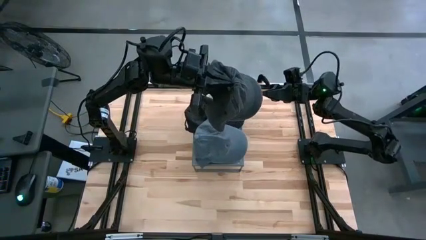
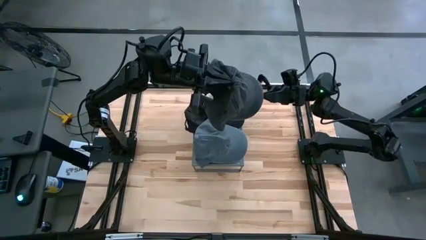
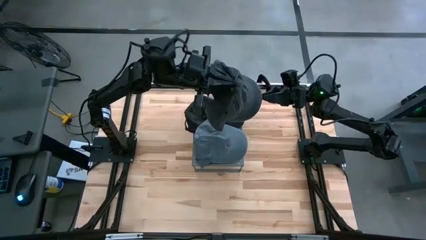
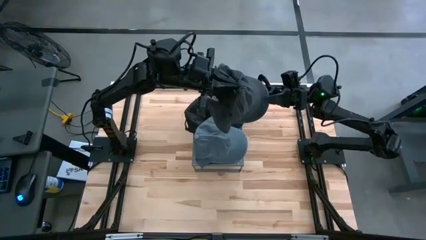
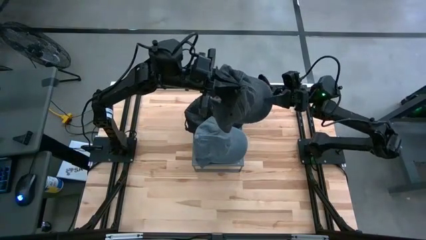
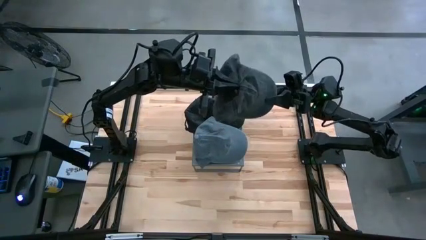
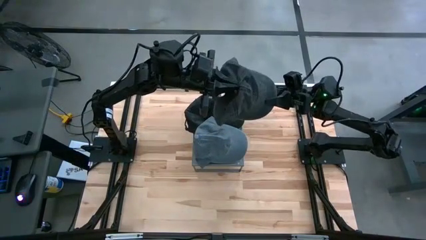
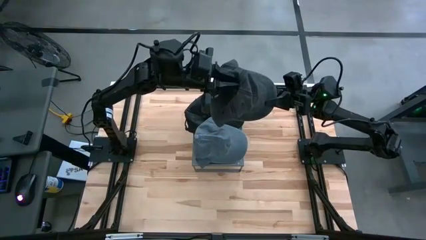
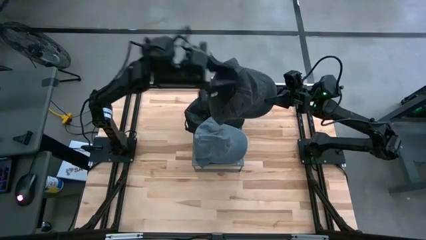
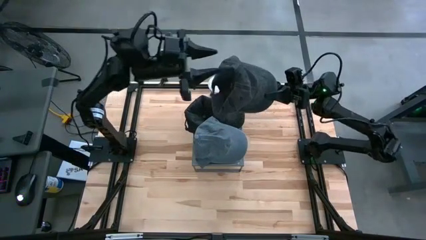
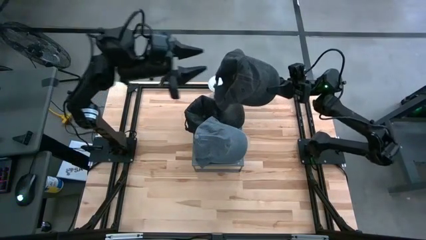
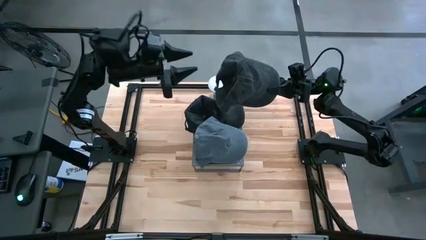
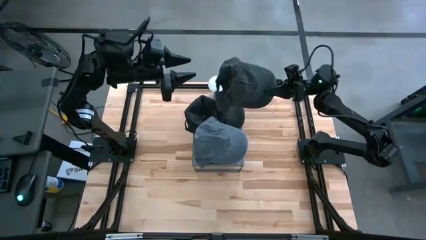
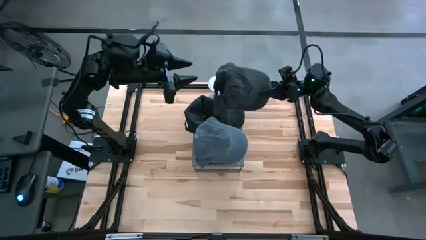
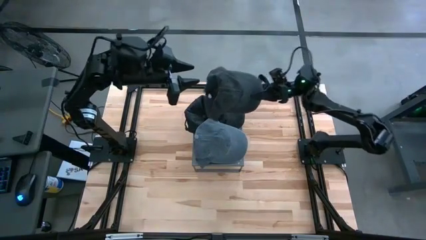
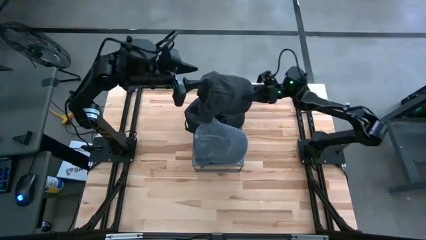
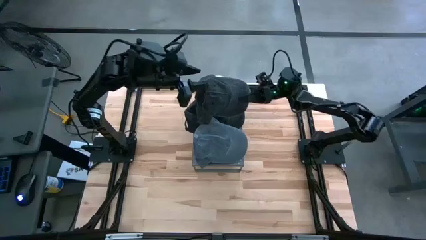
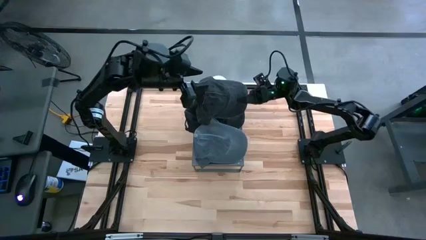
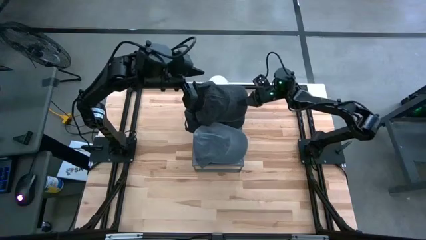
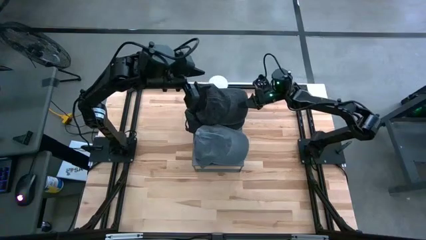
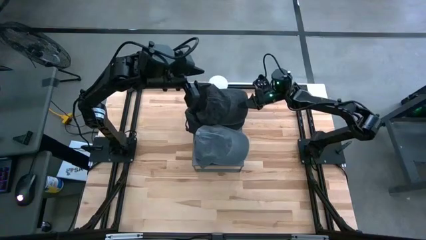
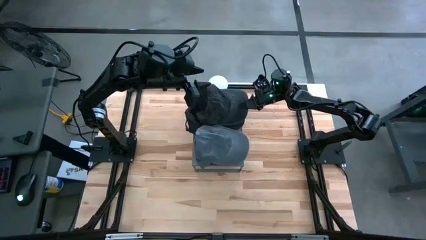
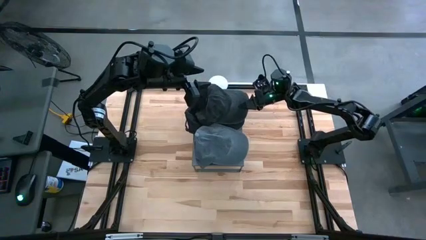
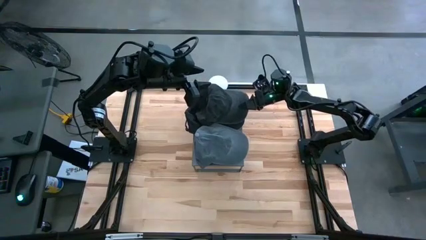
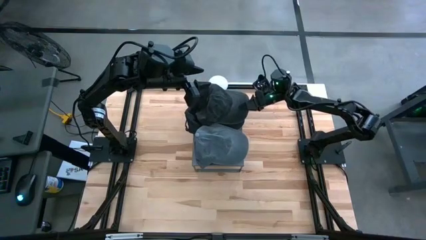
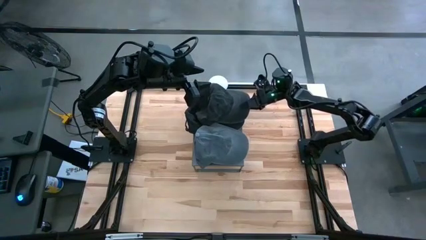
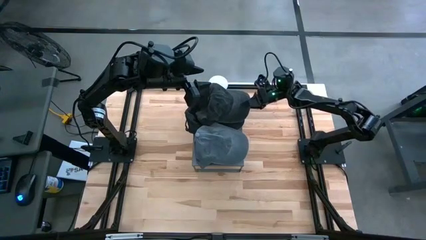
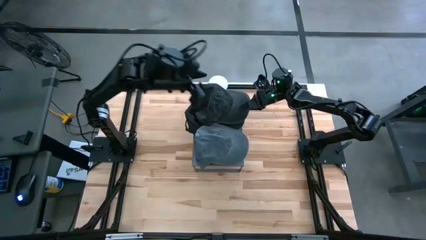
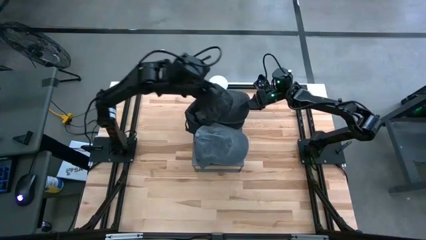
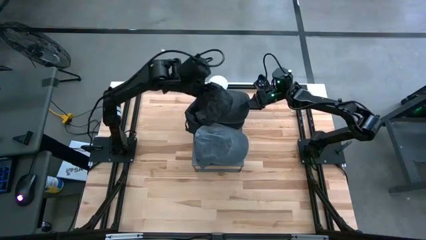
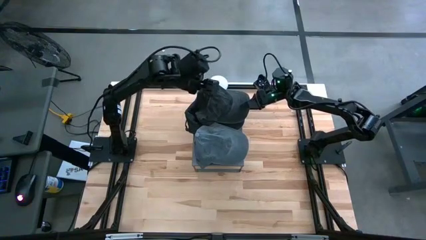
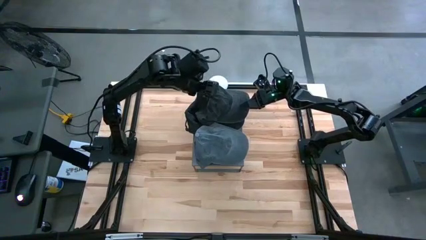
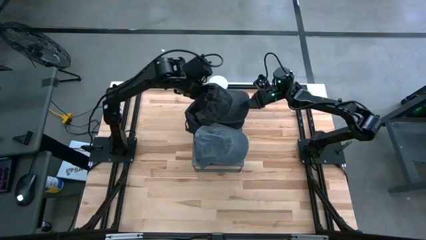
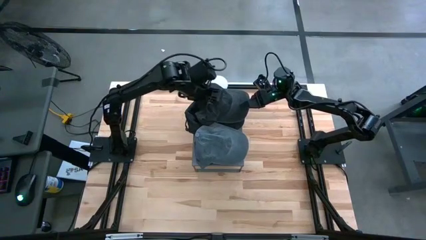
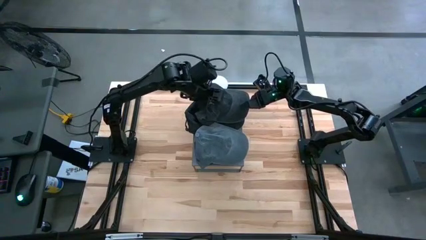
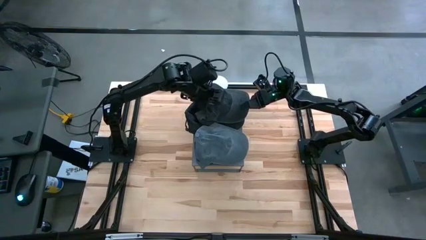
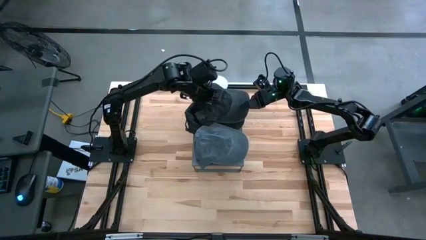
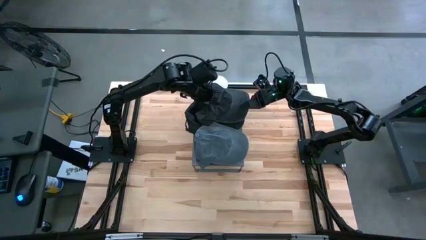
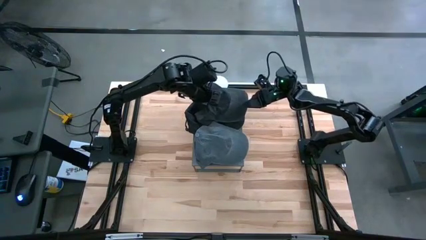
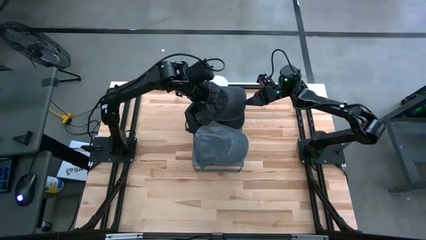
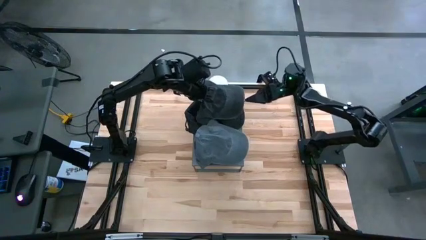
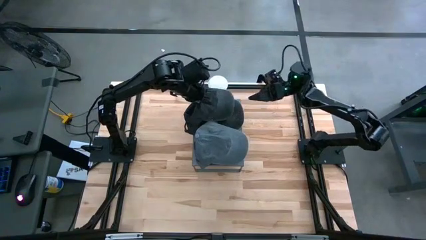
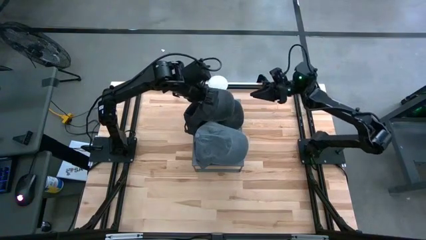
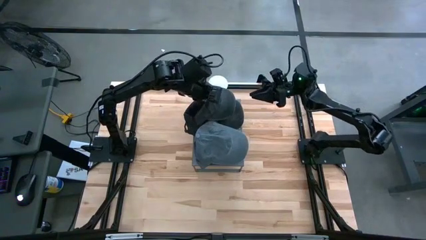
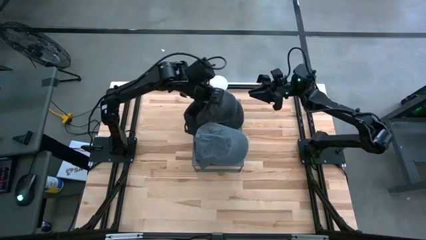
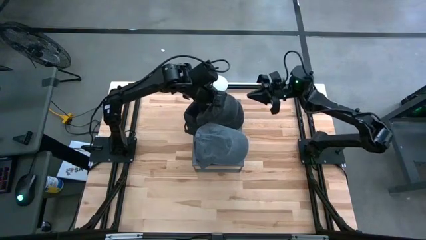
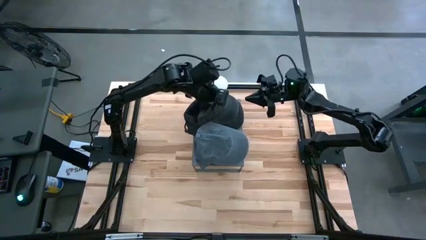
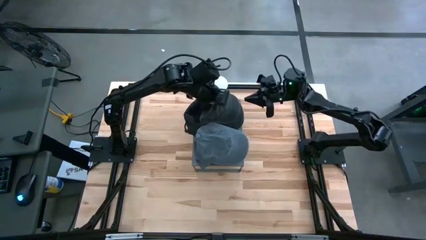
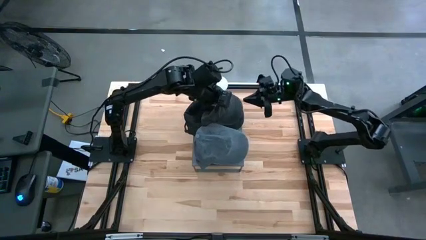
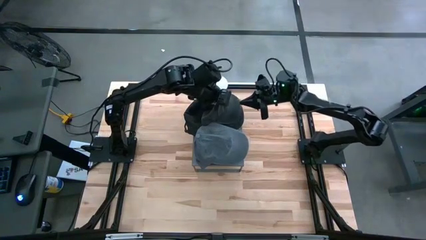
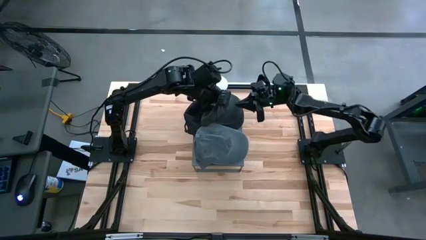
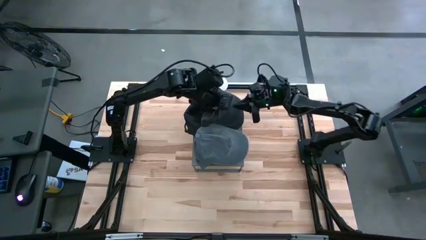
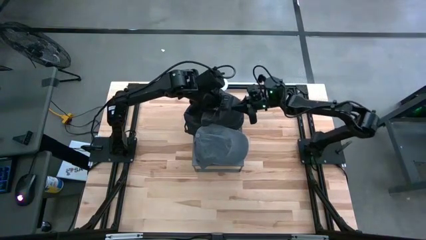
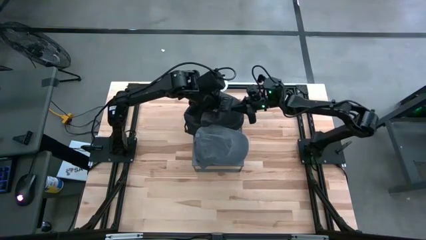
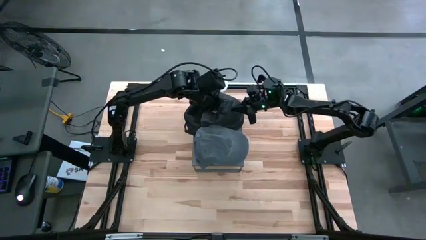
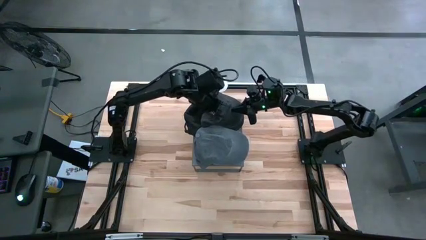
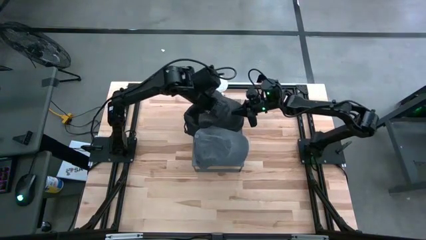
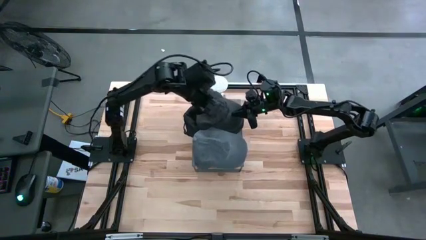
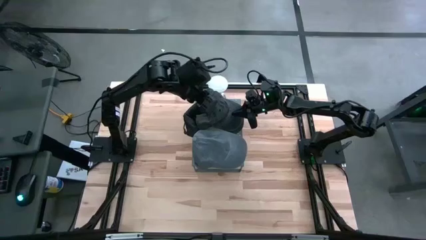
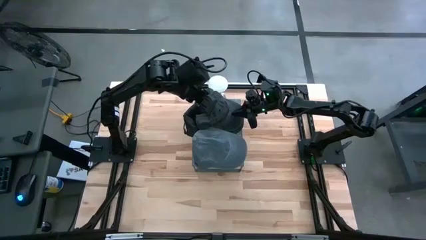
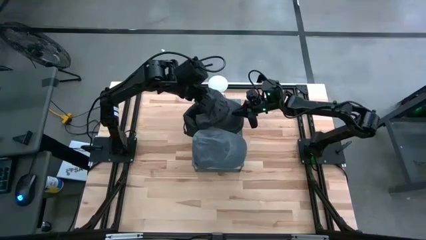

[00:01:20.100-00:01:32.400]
Task: Pick & Place hat
Stack the black cap on the black cap on the shelf

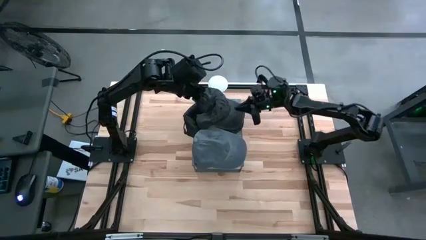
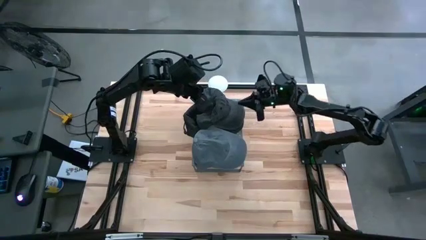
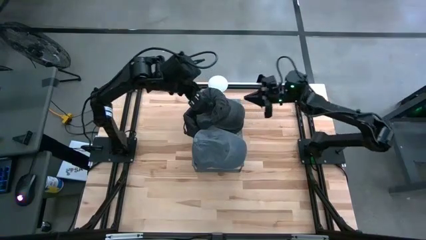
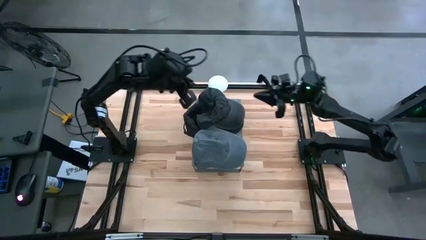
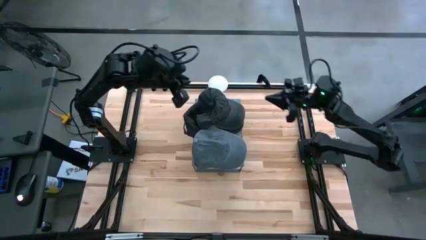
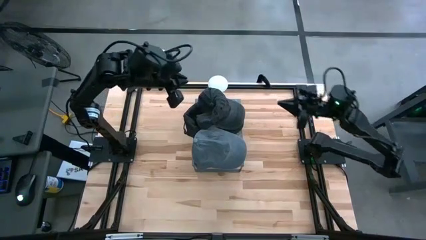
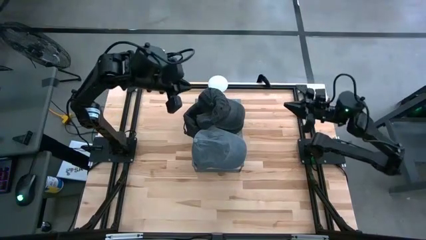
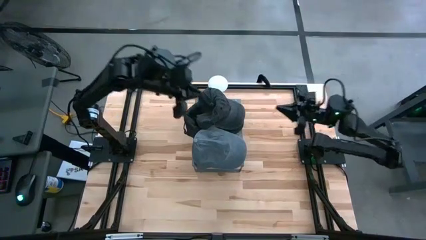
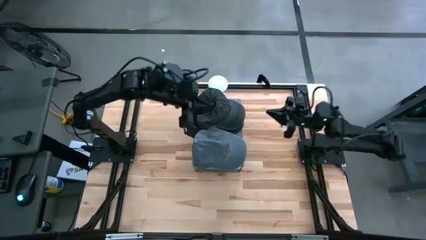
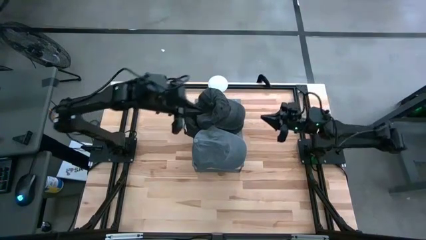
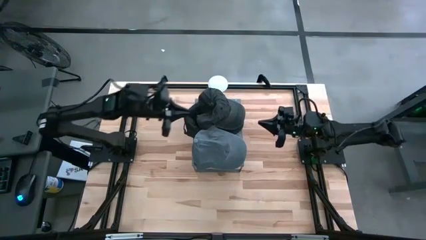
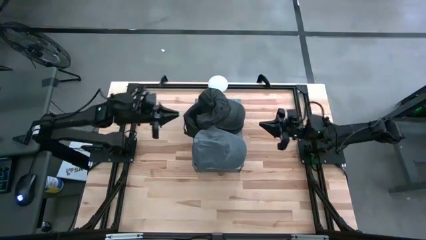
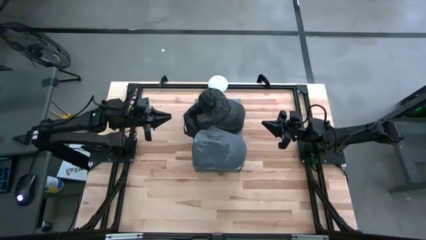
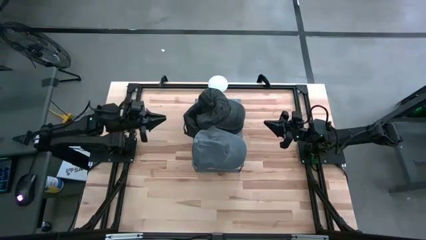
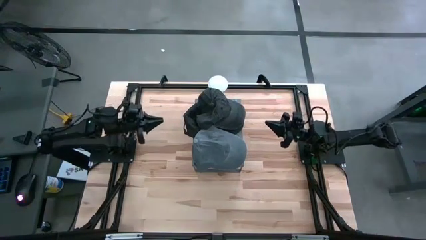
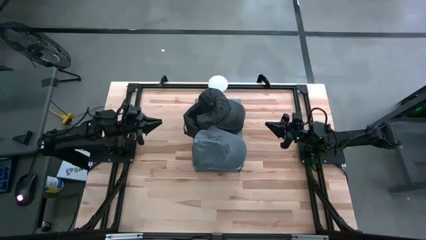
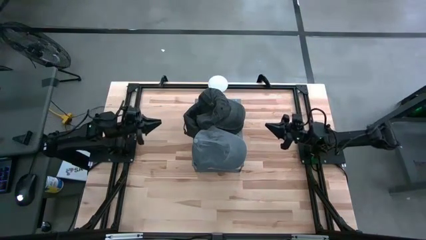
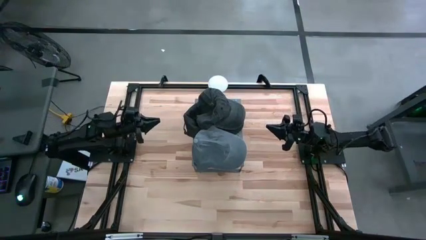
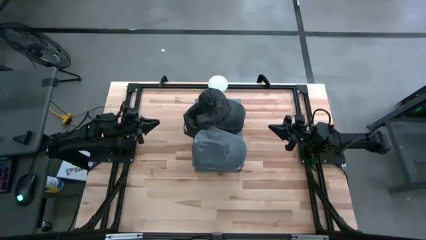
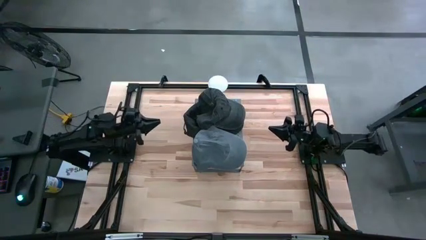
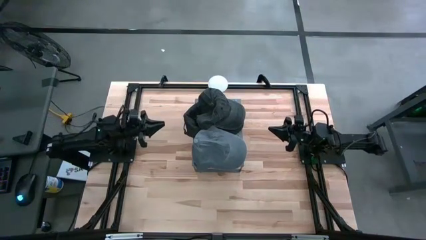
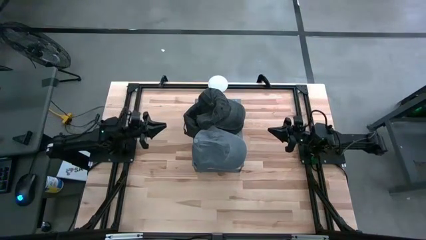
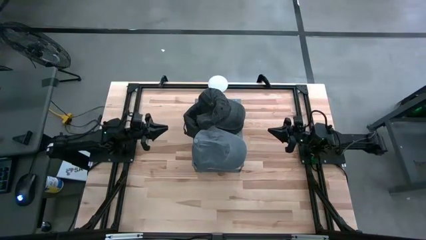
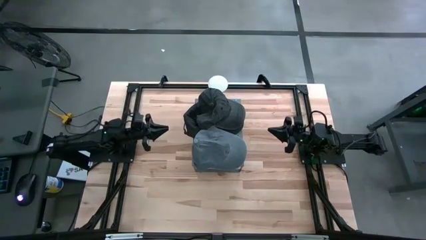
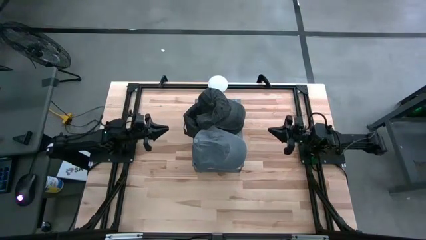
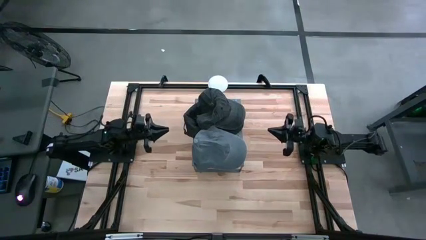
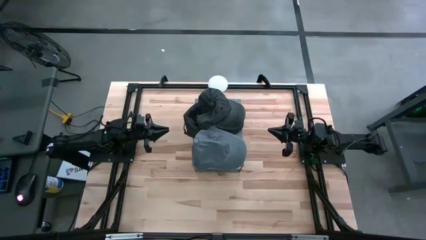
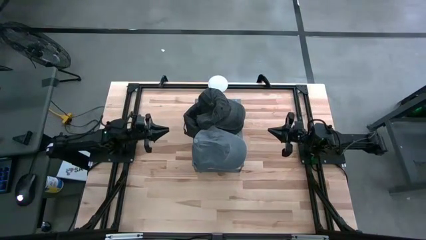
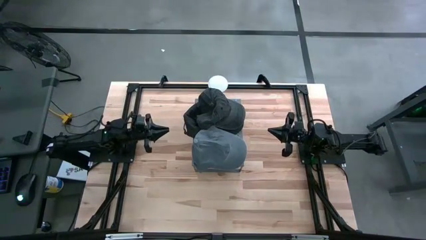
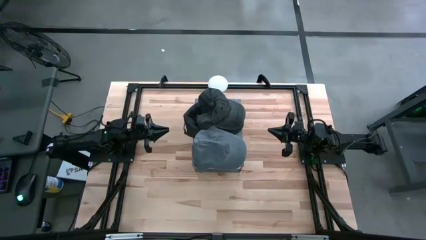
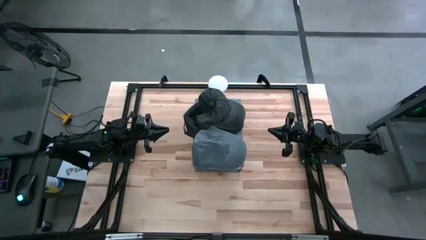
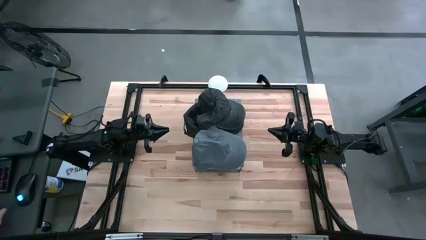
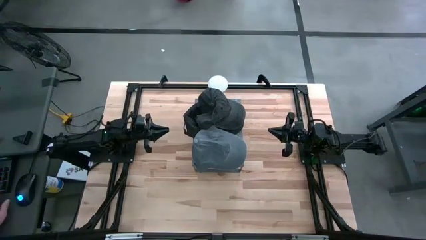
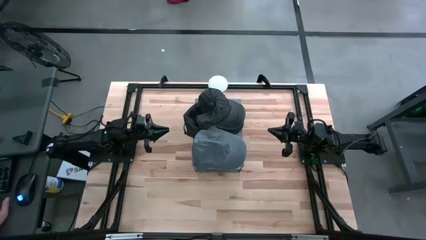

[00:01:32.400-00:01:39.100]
Return to Home Position
